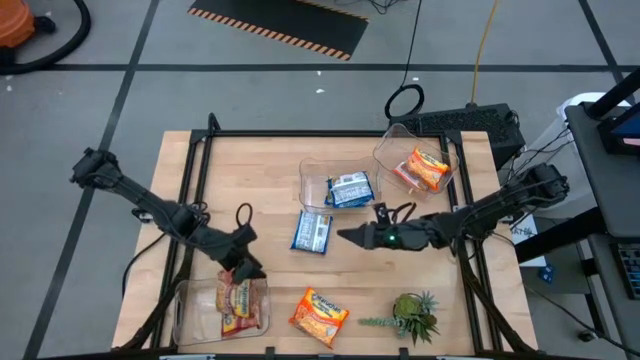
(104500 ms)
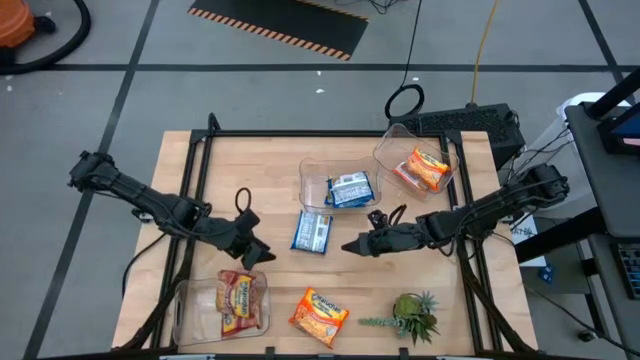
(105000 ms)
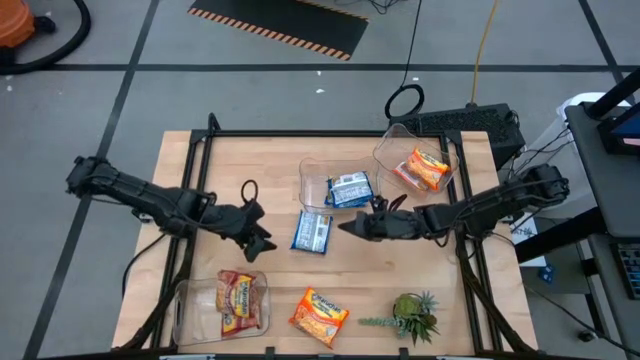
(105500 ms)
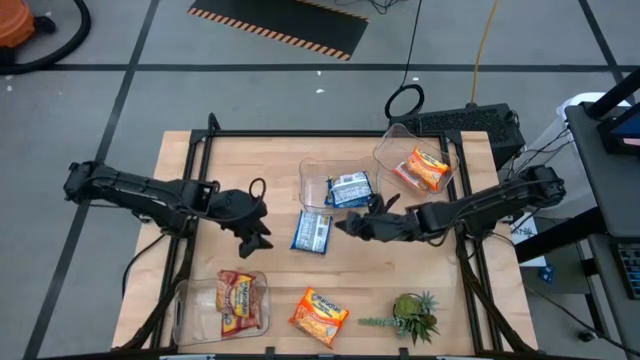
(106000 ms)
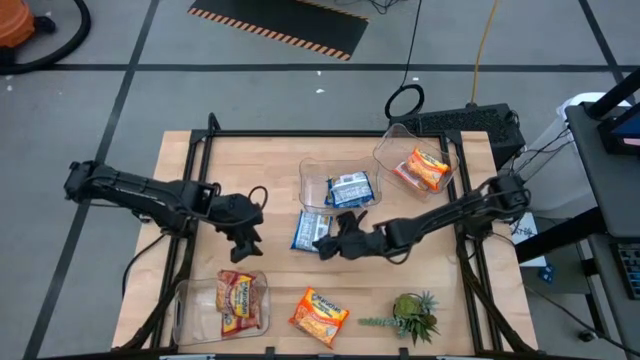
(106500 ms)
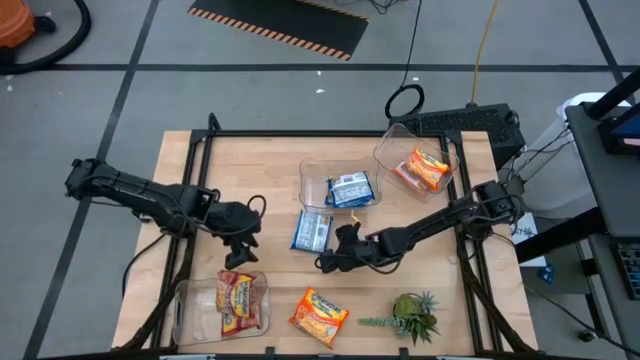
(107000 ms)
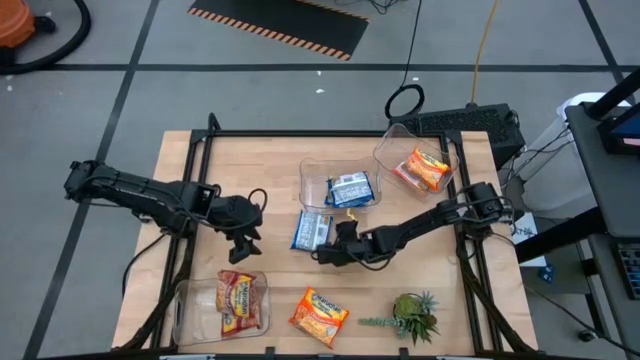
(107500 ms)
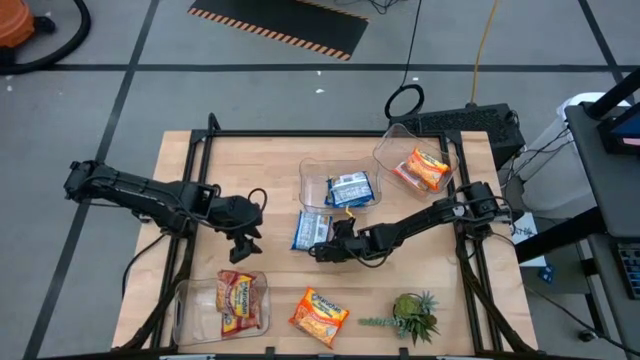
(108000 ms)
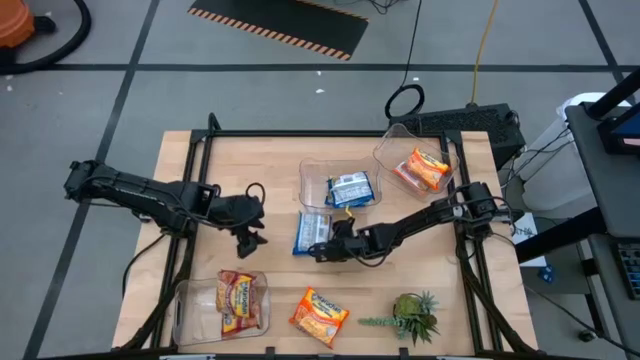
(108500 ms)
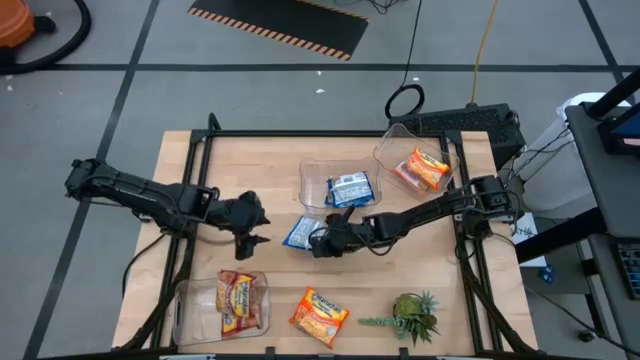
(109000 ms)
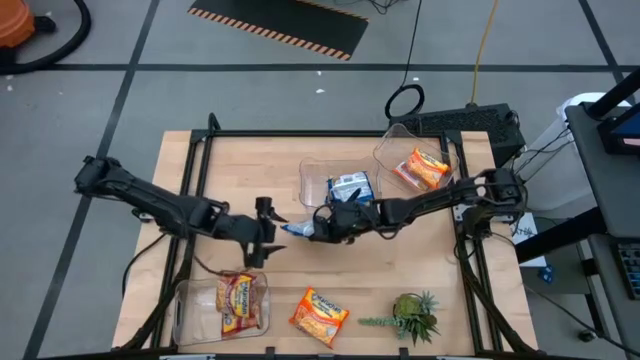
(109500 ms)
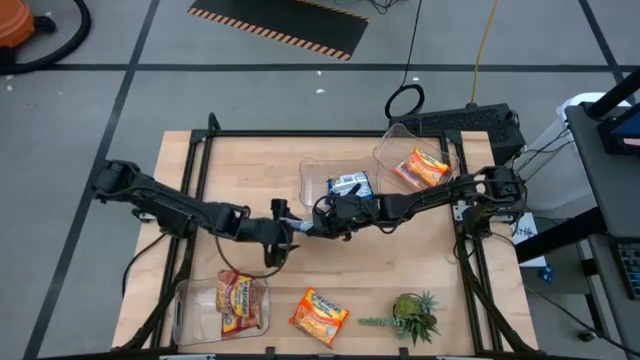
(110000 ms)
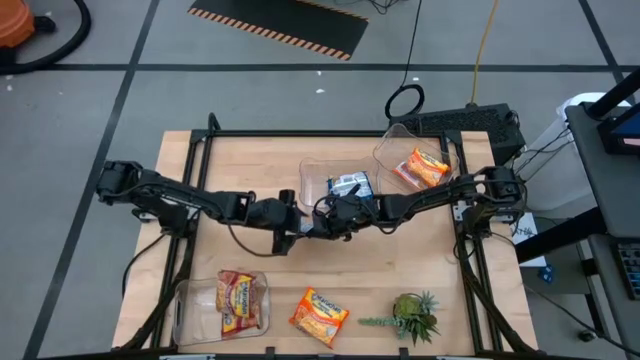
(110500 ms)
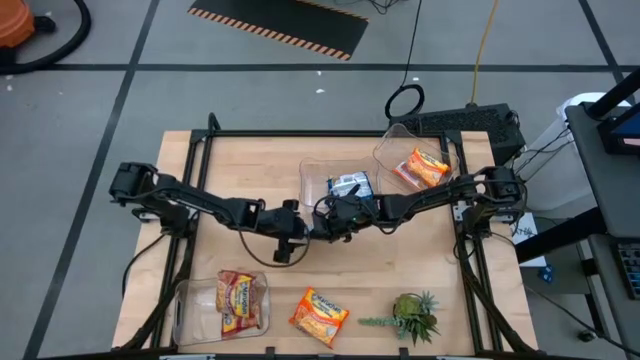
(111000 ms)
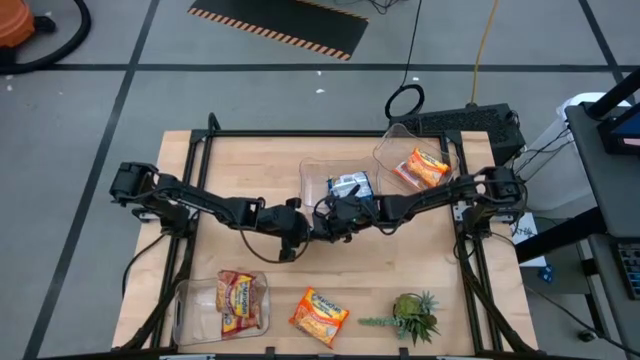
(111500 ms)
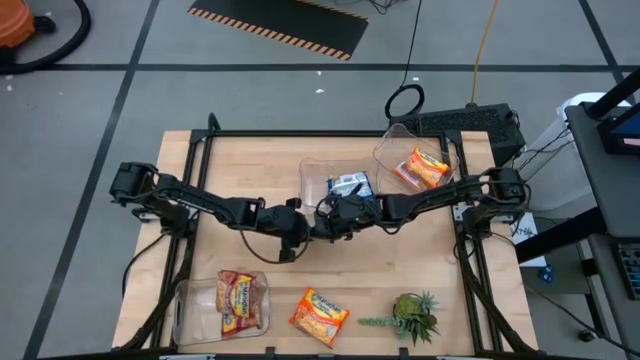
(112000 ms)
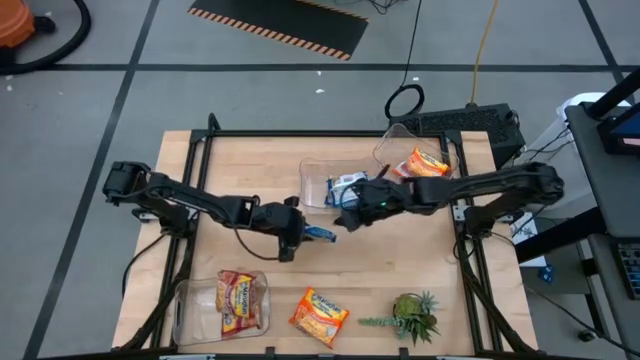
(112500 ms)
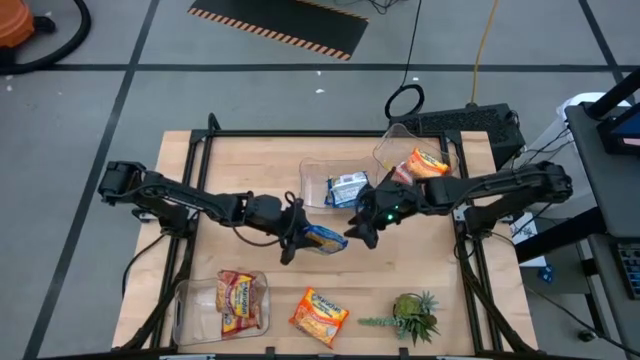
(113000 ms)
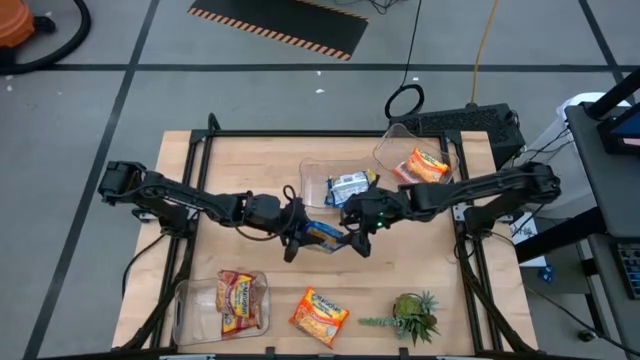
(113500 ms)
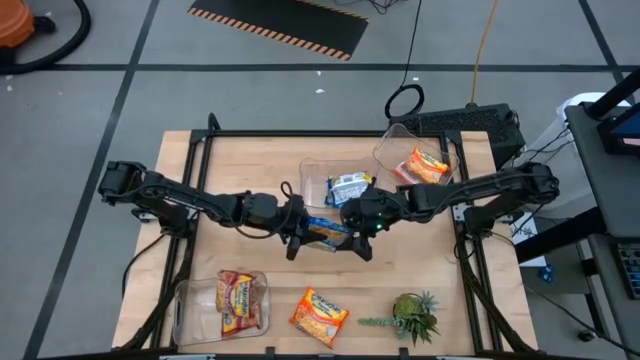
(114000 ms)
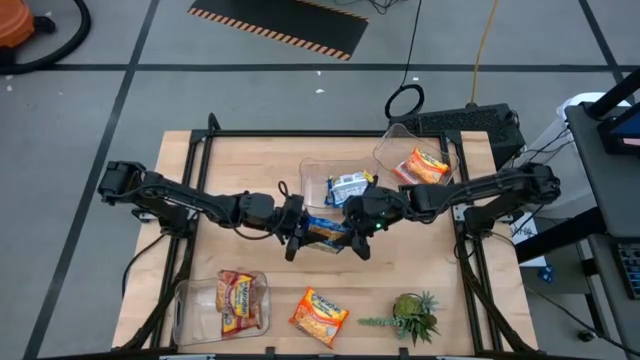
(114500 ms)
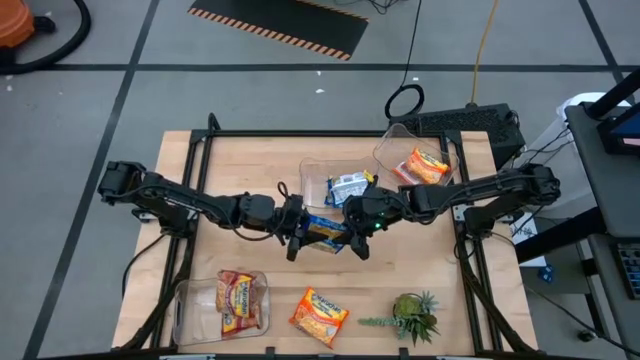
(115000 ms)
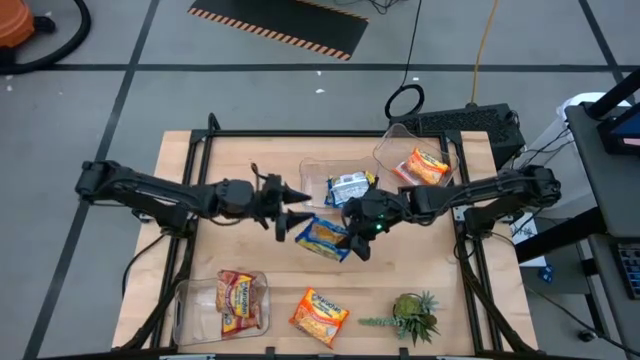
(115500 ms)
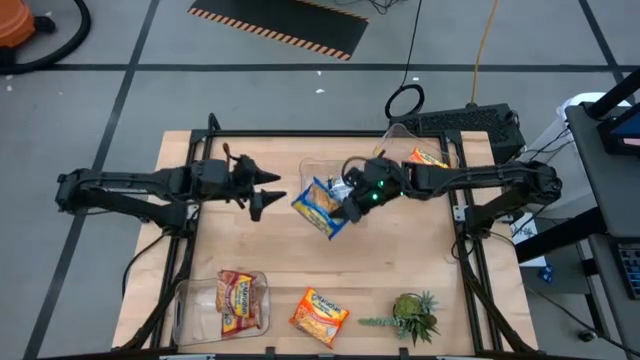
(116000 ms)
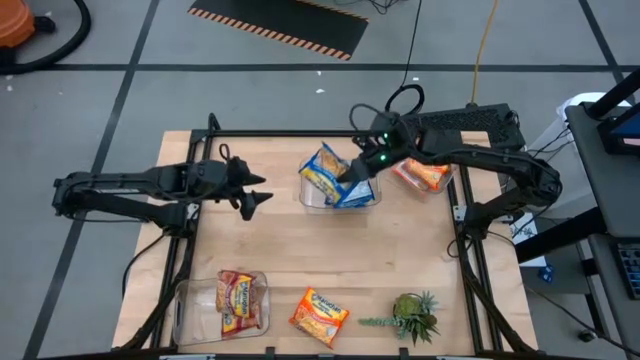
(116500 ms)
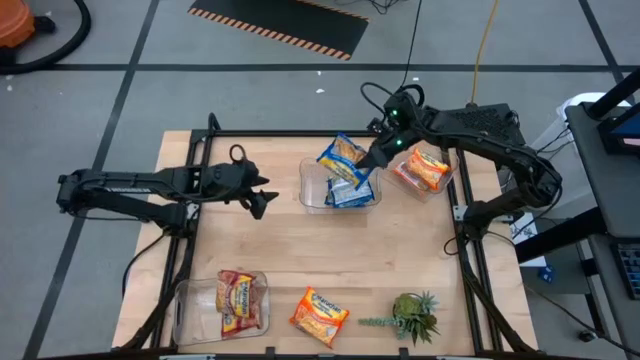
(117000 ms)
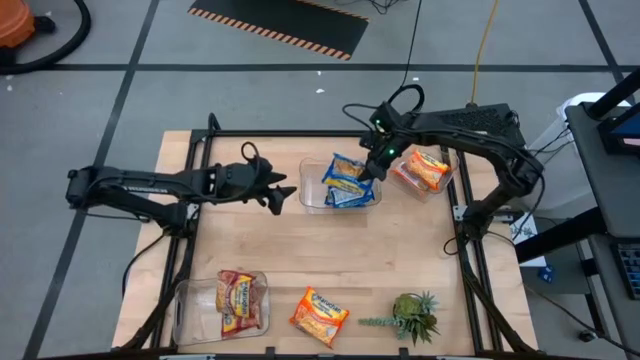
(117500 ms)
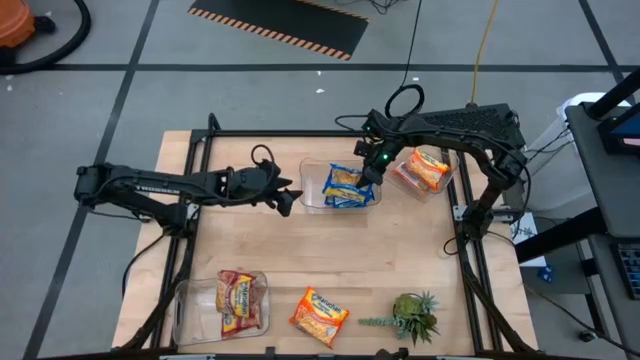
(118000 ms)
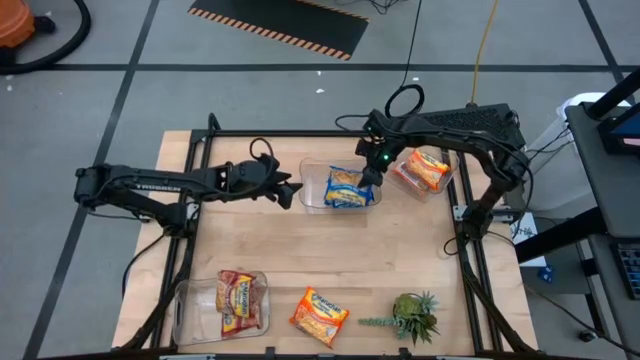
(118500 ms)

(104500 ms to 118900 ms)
Task: Sort Maruchan noodles
Stack the blue noodle pack on top of the other blue noodle pack into the top left transparent bin

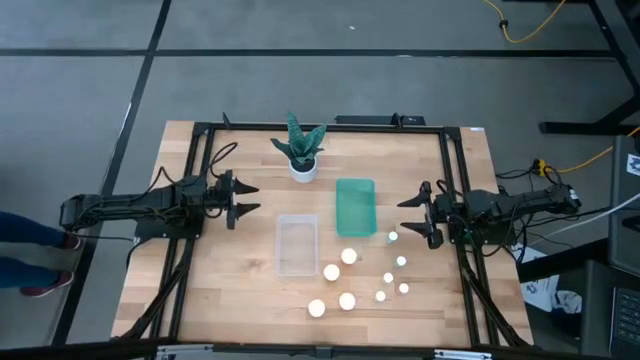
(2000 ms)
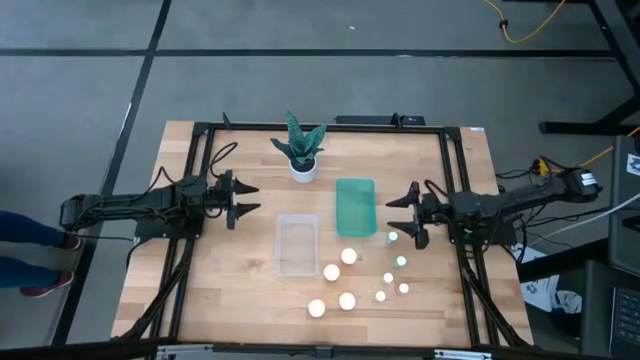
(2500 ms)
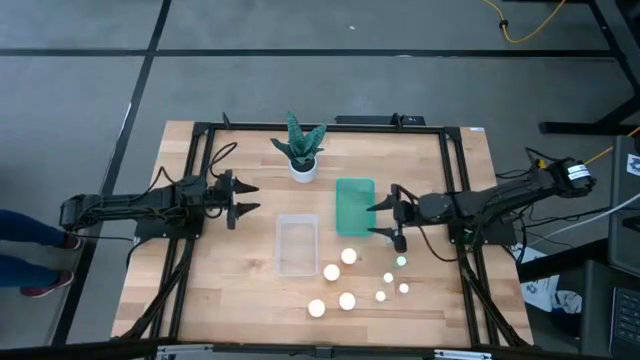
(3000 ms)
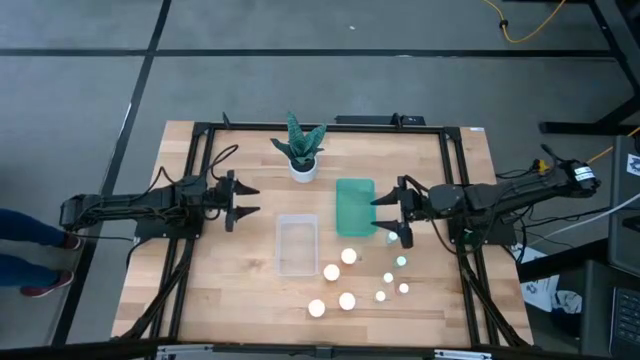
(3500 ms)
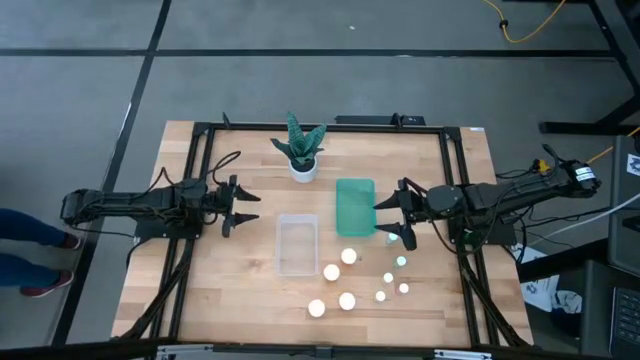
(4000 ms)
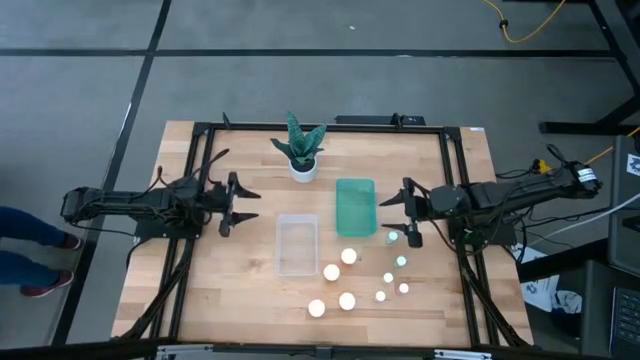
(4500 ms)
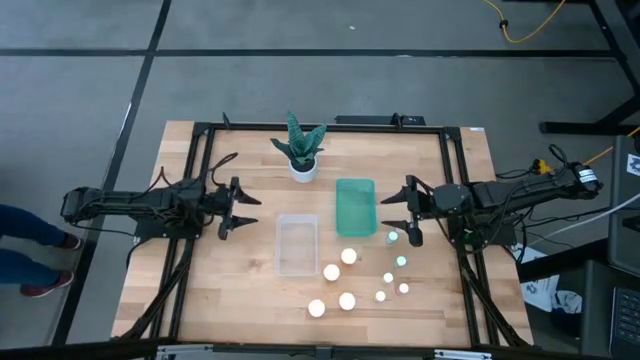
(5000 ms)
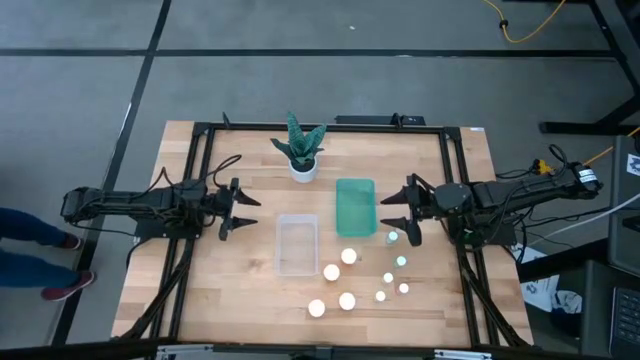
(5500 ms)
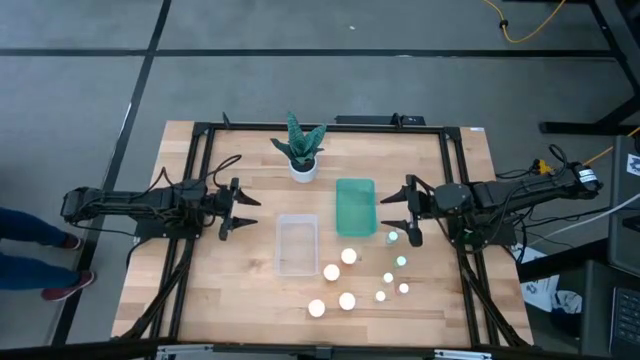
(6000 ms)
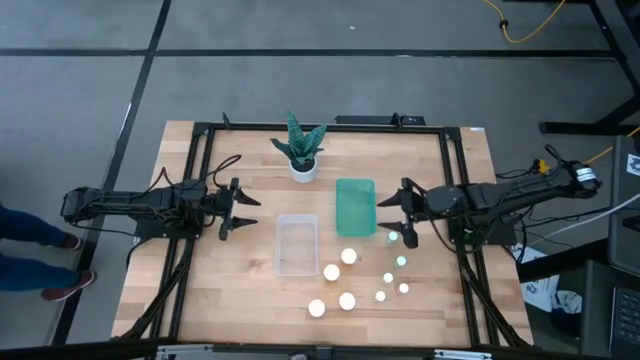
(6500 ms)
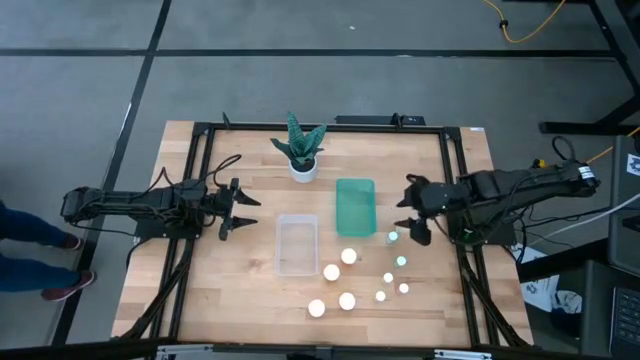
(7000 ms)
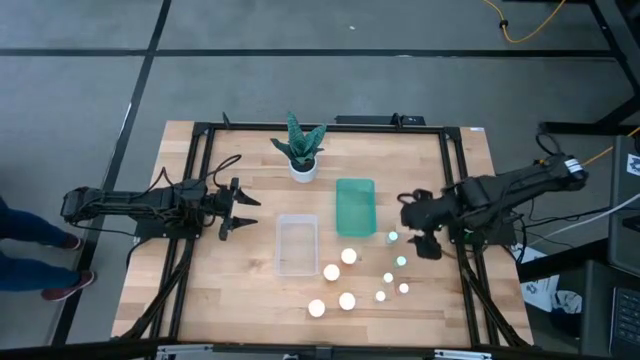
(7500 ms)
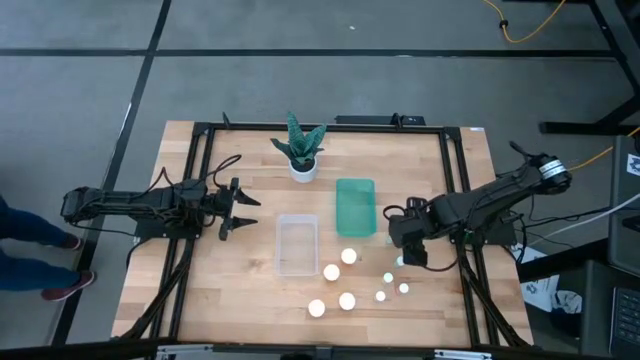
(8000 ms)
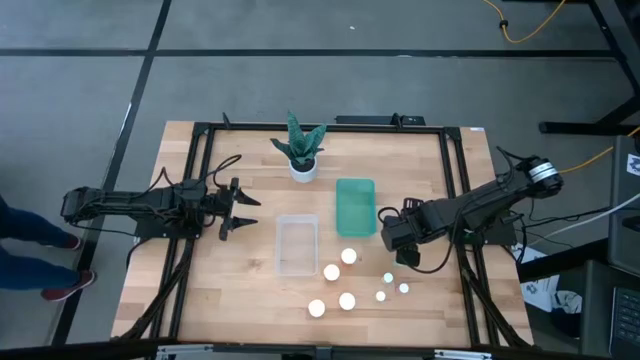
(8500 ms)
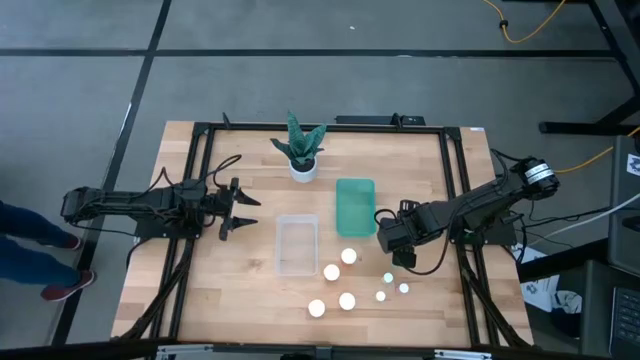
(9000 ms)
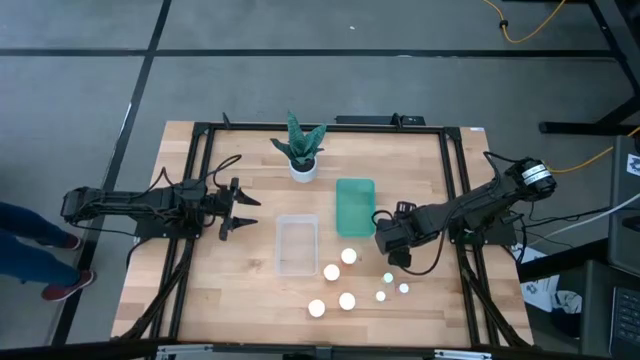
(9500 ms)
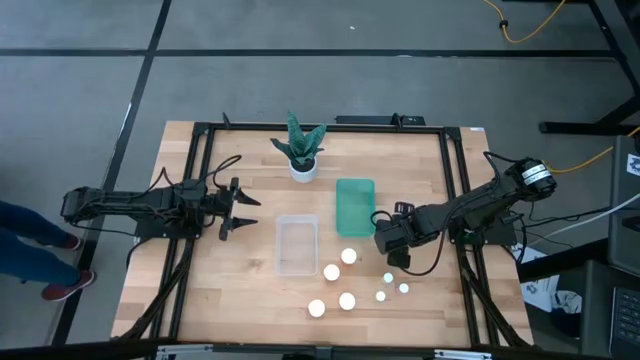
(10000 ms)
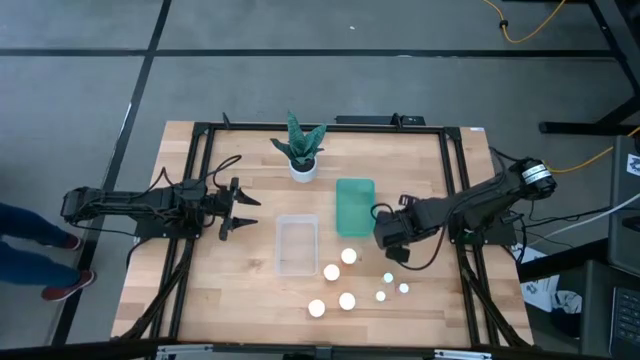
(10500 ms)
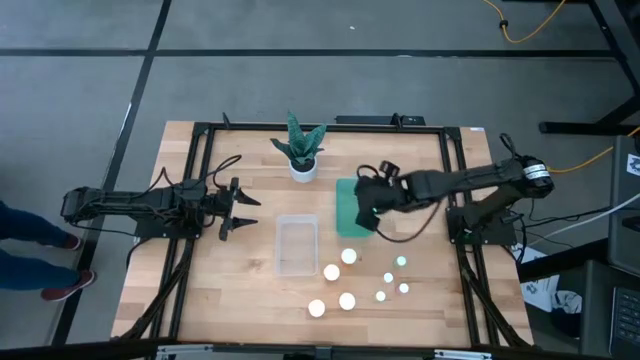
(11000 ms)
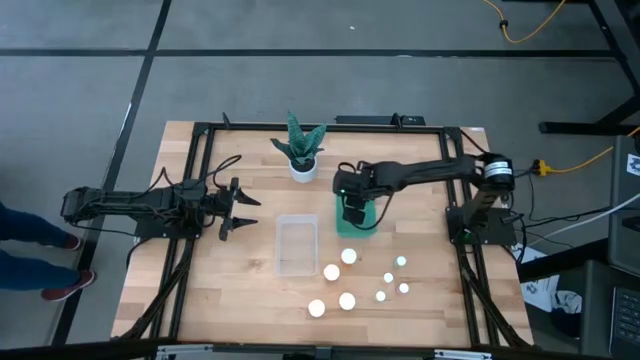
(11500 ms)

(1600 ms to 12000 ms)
Task: Pick and place medicine bottles into bin by pill shape (circle, oval)
Put the small blue pill bottle into the green bin
